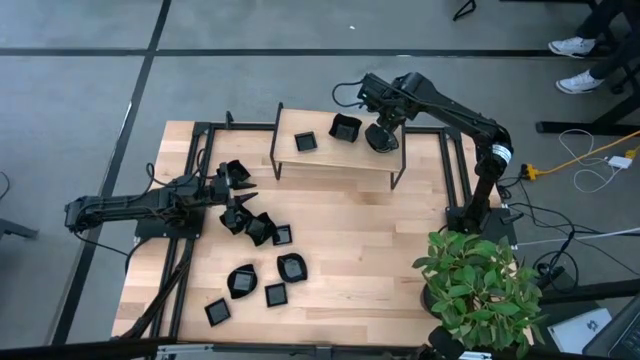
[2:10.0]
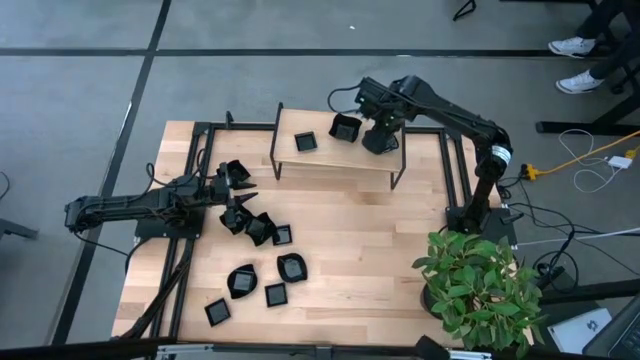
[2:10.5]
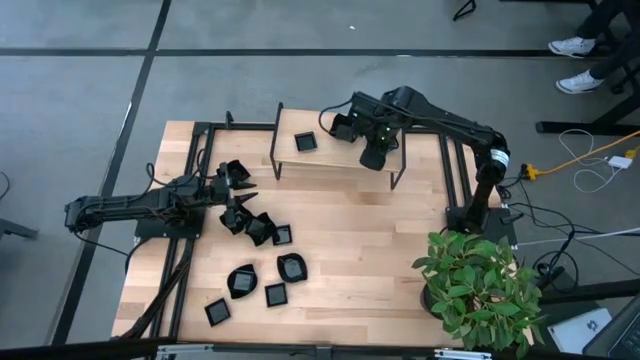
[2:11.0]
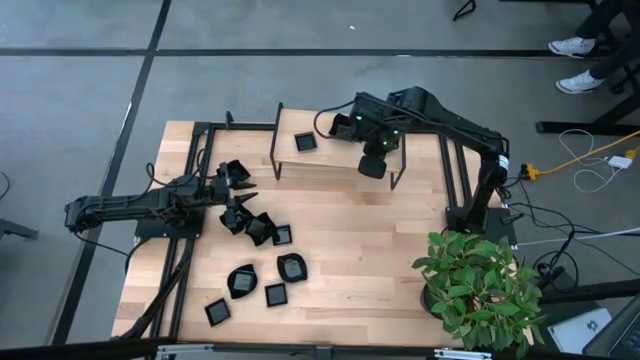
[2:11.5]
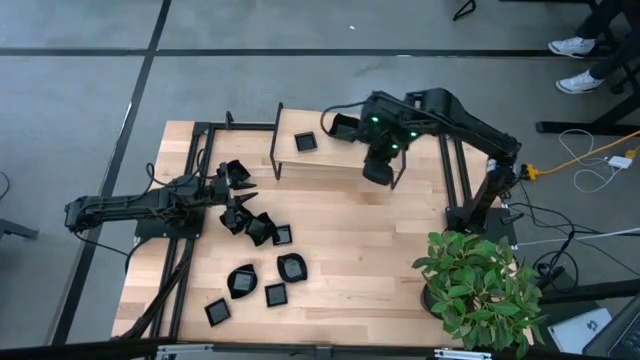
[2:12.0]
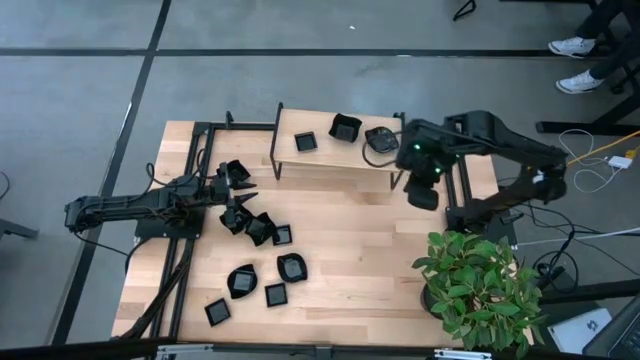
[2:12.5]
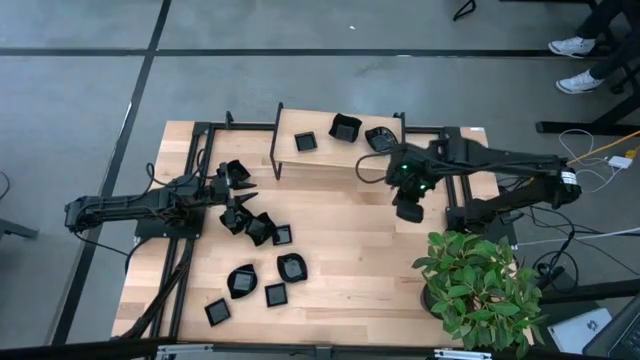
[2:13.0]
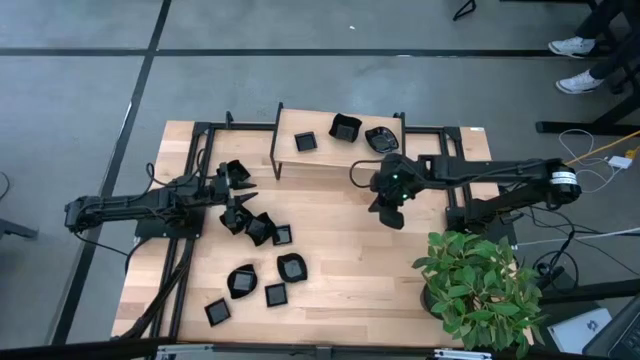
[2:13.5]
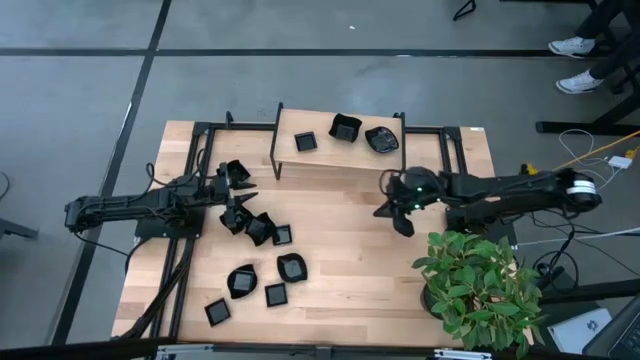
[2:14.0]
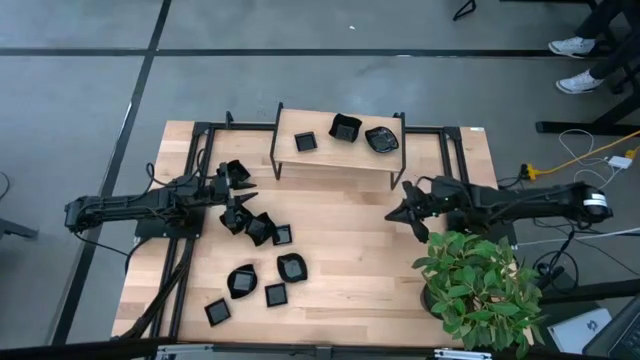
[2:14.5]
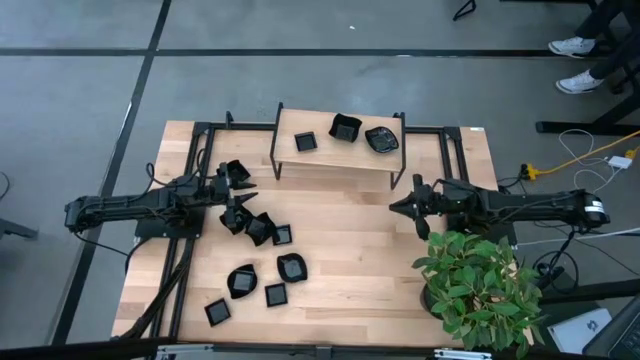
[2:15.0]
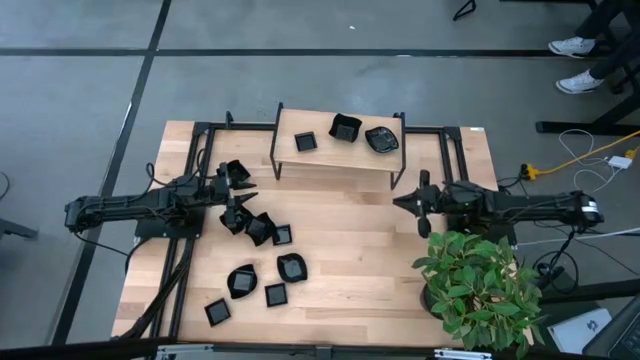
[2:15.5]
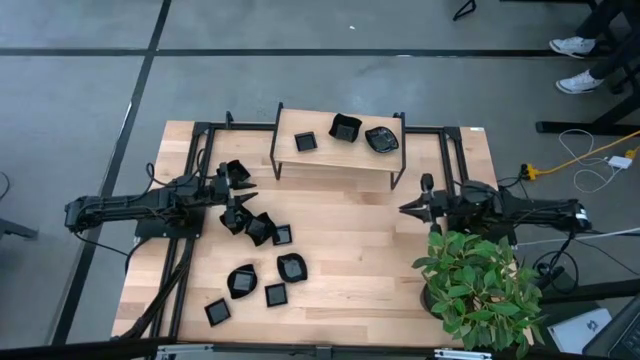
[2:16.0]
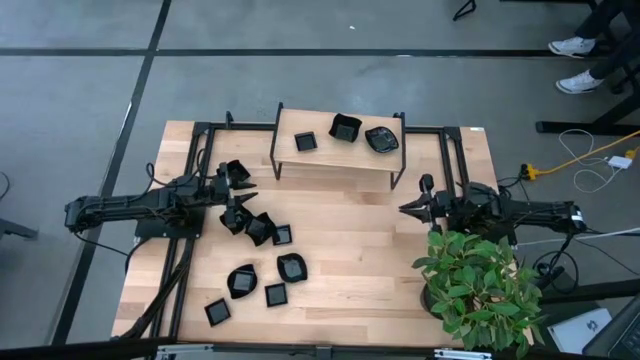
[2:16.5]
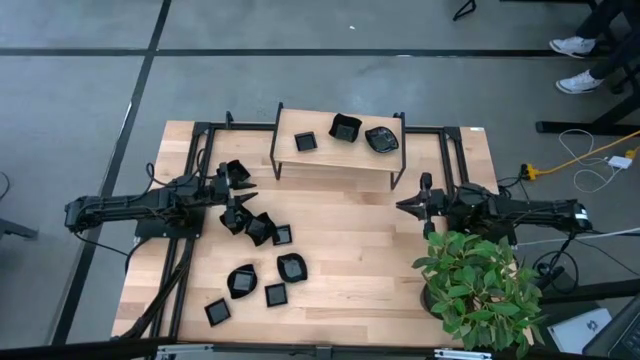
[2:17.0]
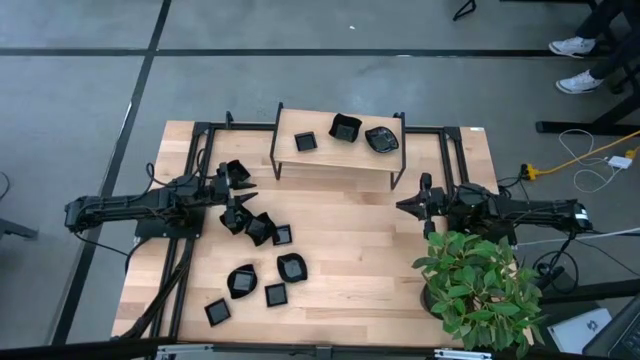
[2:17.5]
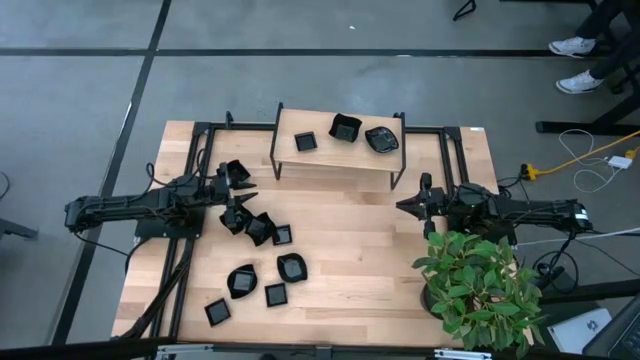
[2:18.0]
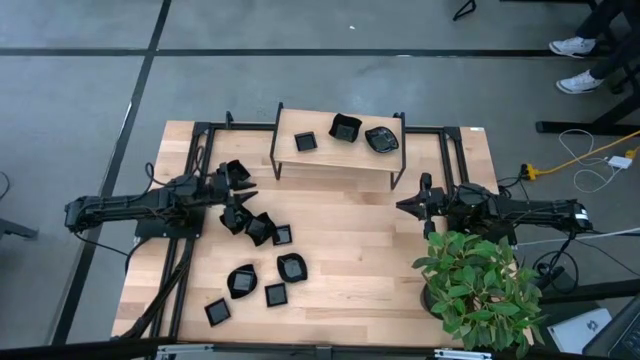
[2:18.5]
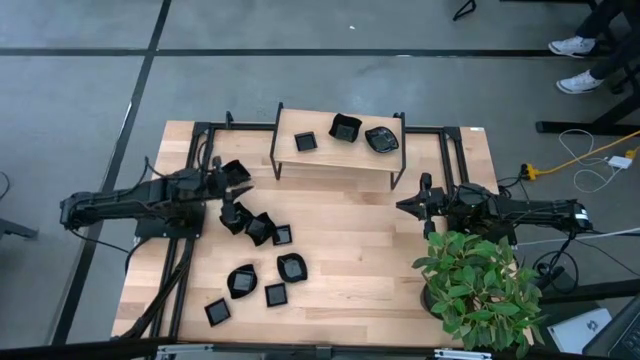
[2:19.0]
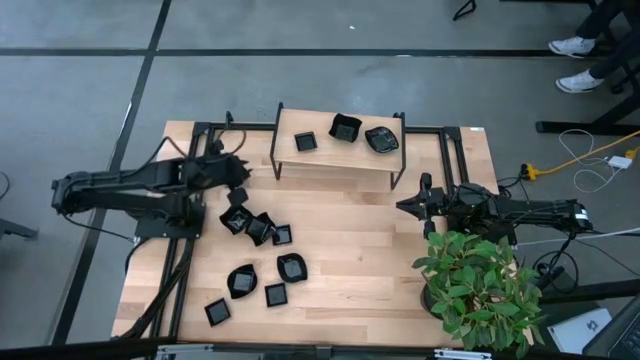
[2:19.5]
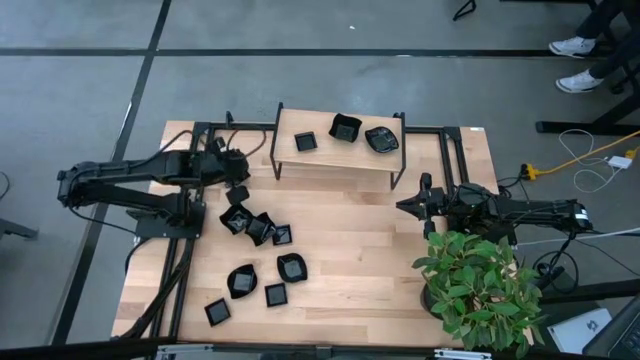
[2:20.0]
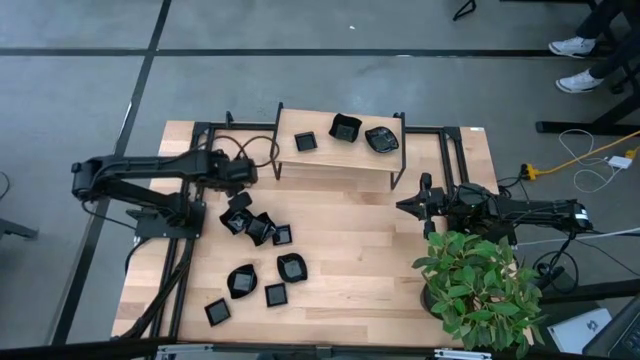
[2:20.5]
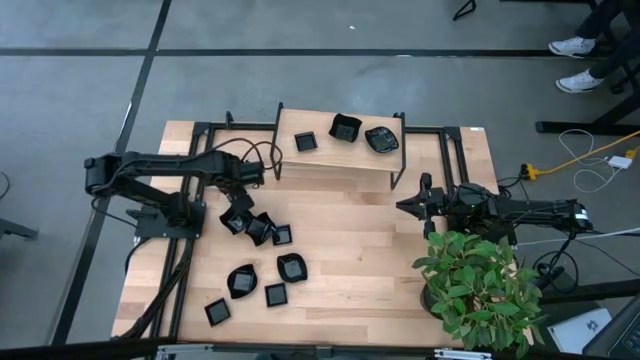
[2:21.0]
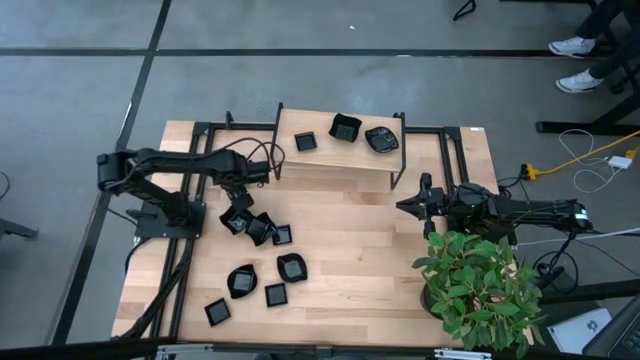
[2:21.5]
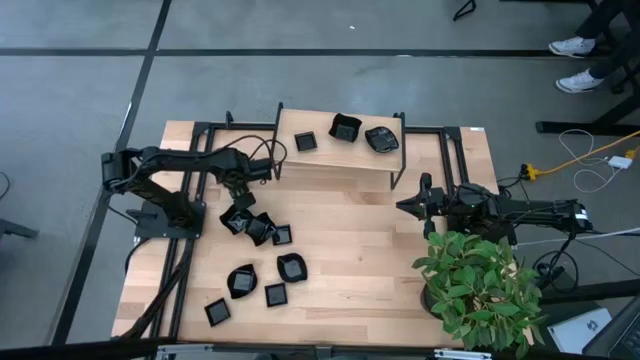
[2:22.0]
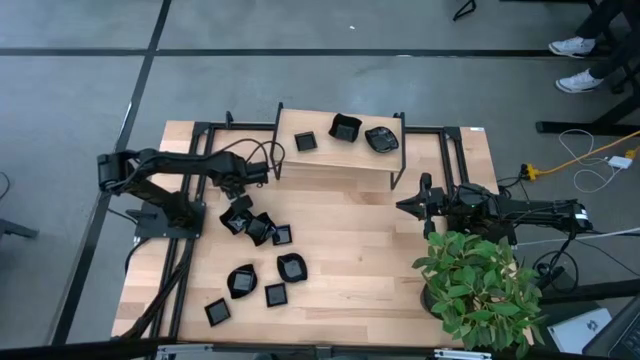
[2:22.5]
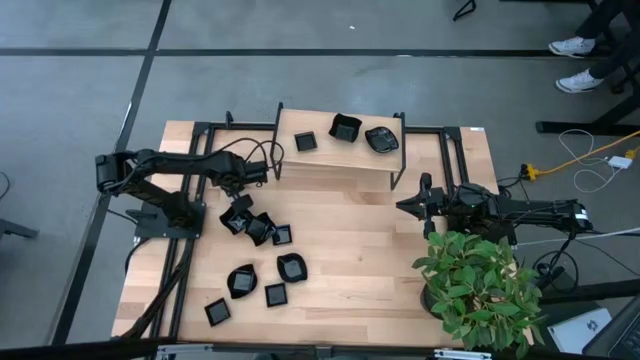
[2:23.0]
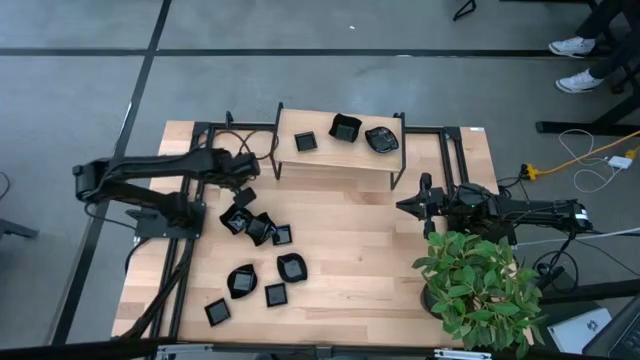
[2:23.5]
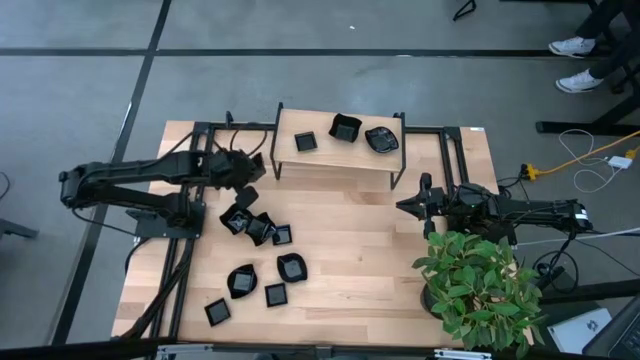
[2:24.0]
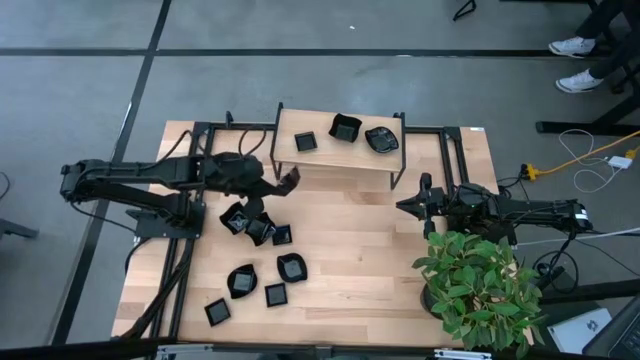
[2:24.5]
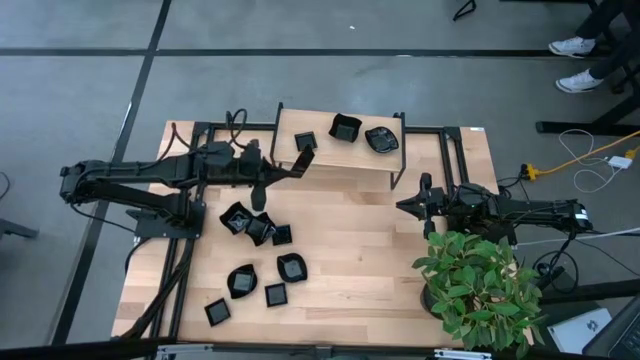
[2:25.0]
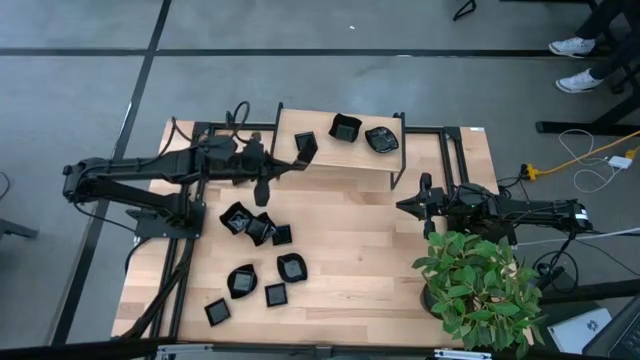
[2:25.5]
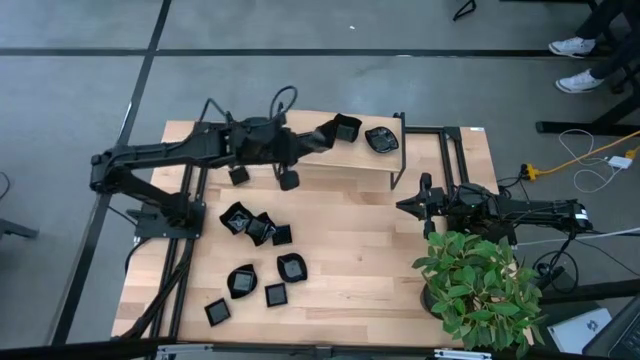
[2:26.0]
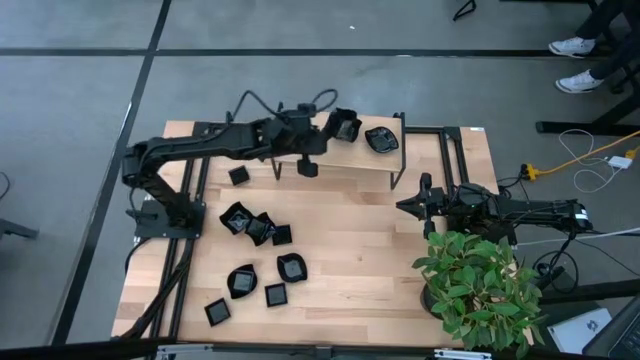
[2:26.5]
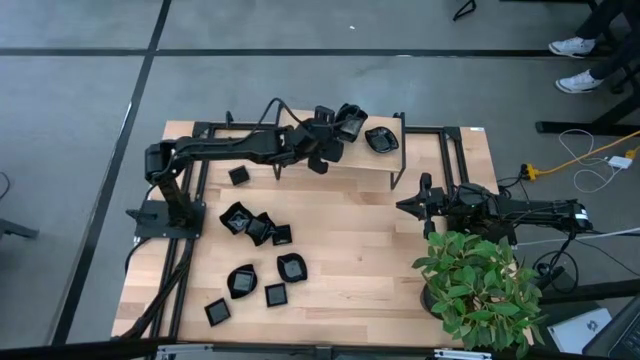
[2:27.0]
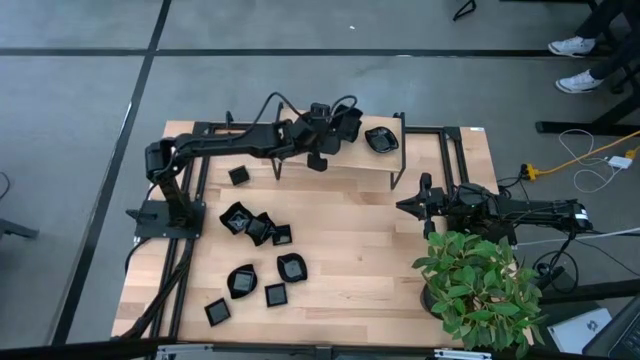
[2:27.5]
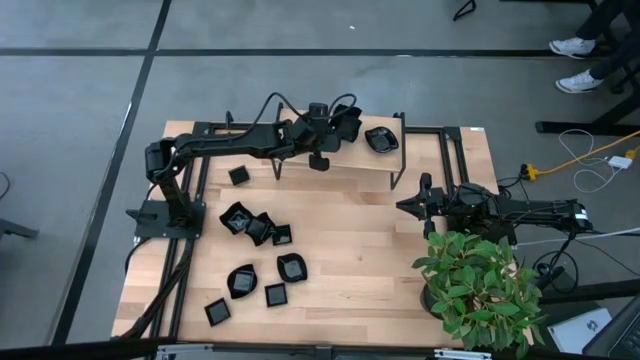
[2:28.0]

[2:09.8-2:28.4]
Task: Pick & Place Mini shaped plates
Stack the distorted square plate on top of the distorted square plate on the shelf

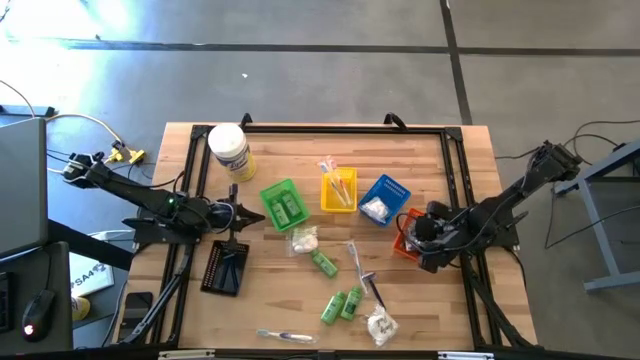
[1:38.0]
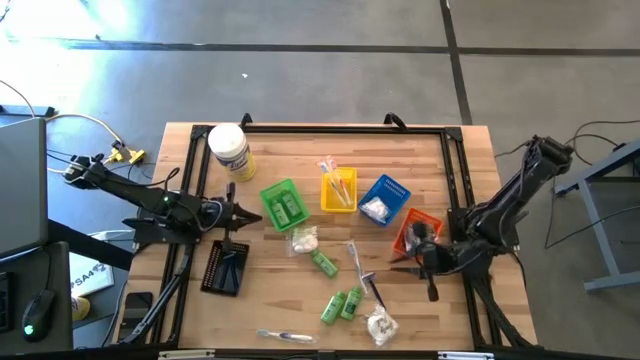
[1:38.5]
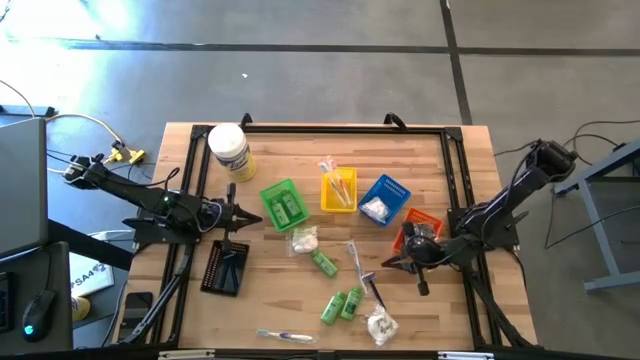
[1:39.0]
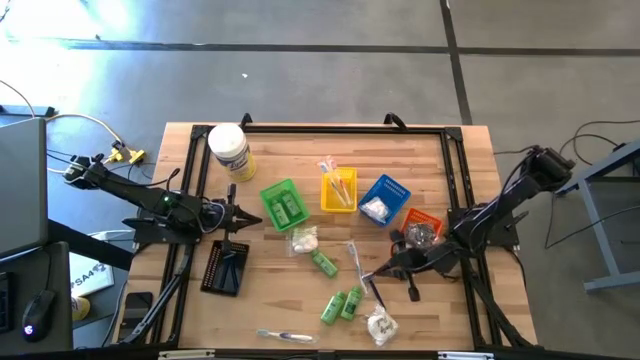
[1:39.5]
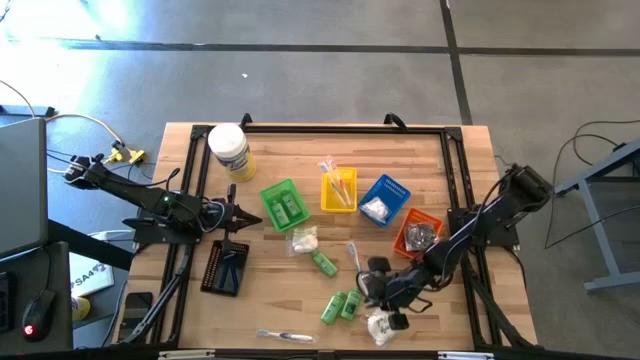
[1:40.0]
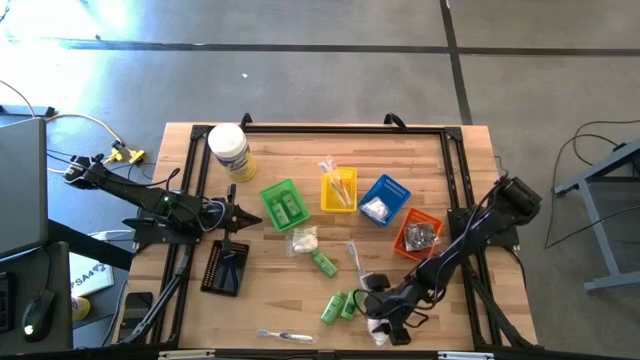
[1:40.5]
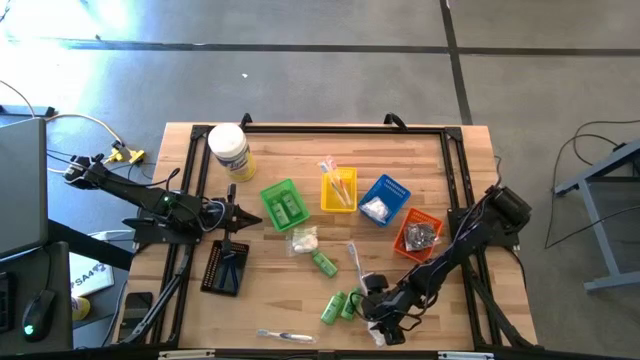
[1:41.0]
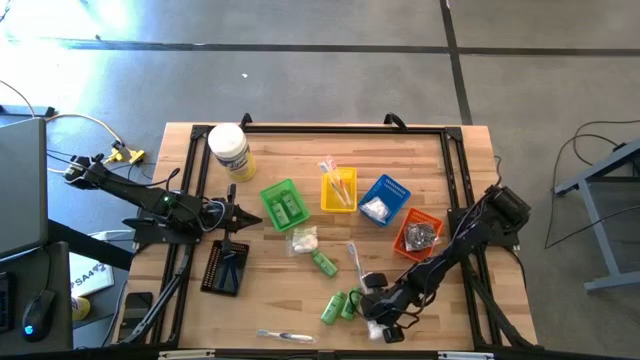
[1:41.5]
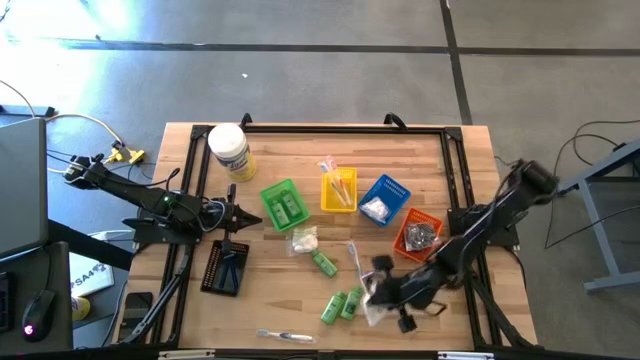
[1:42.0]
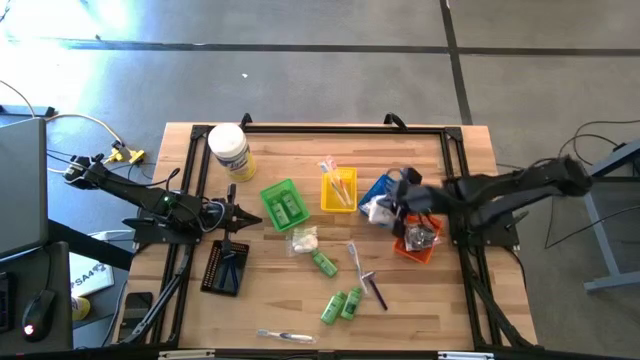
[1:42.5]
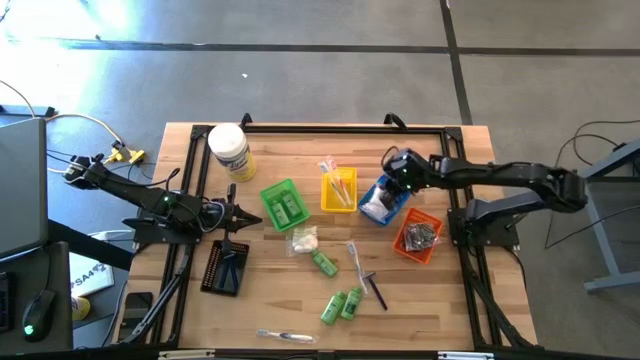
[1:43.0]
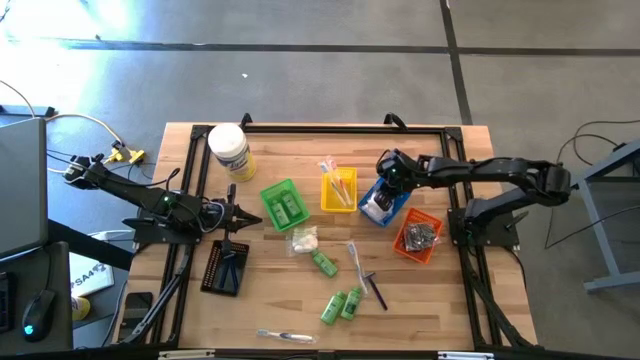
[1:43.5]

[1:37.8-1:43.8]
Task: Pick & Place Travel size toiletries
Put the bottom cotton pack into the blue bin
